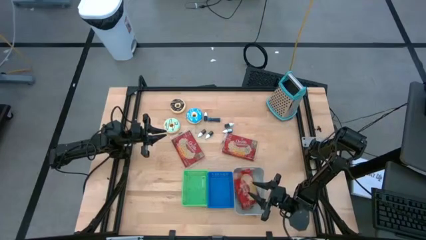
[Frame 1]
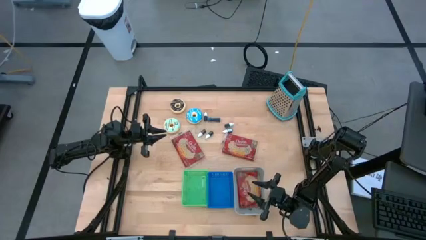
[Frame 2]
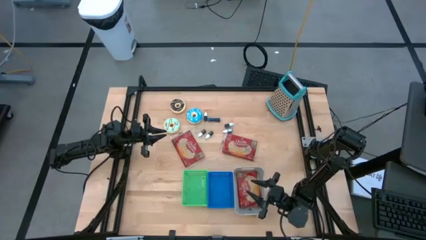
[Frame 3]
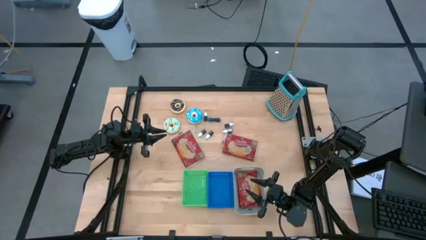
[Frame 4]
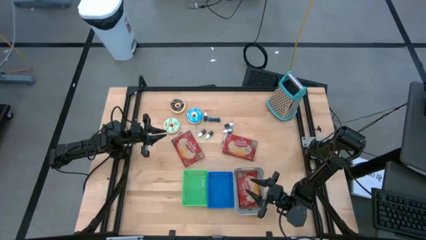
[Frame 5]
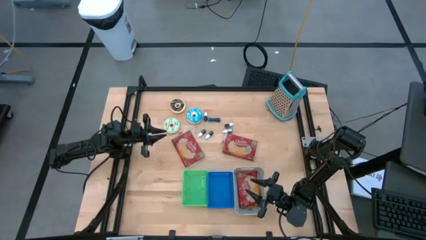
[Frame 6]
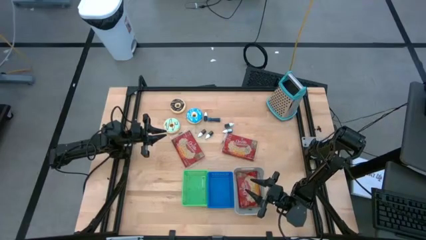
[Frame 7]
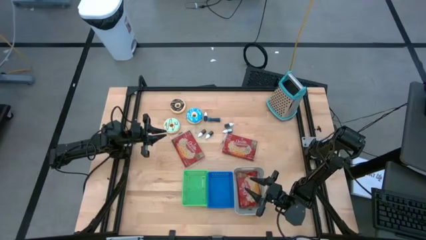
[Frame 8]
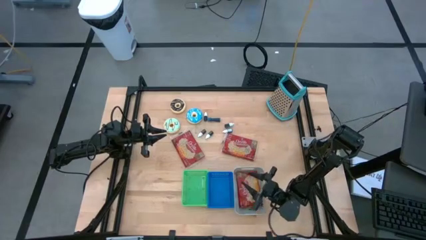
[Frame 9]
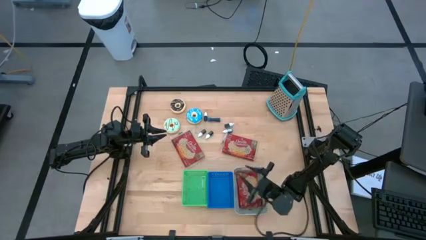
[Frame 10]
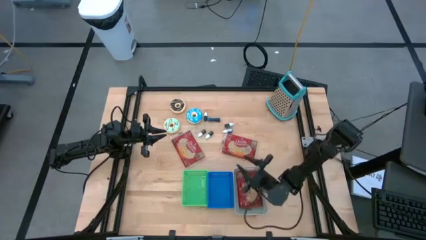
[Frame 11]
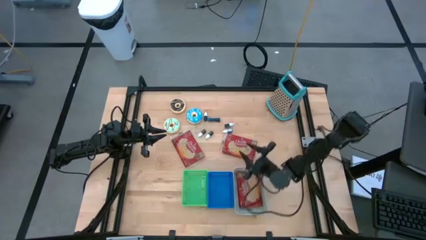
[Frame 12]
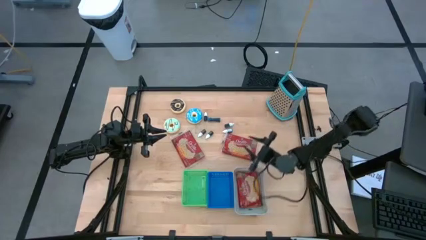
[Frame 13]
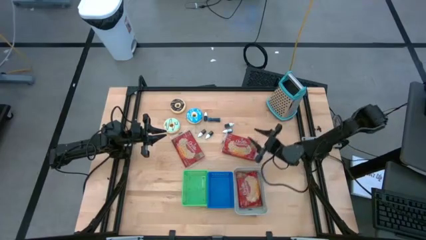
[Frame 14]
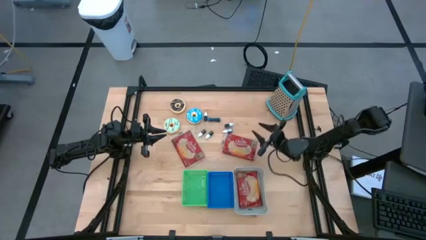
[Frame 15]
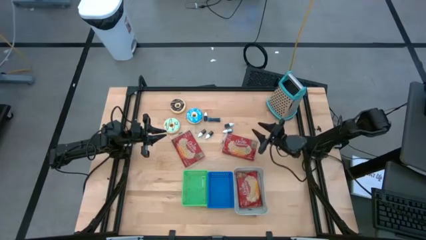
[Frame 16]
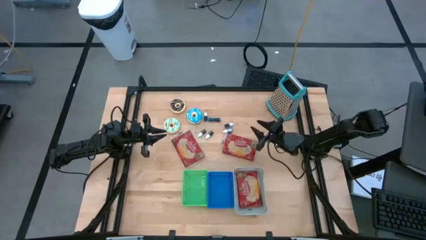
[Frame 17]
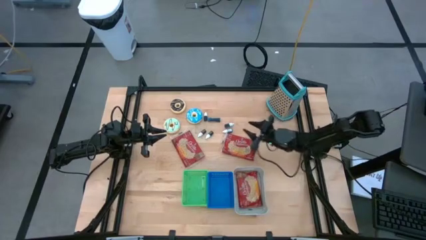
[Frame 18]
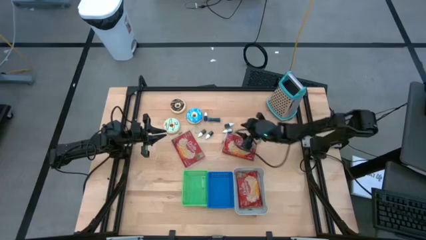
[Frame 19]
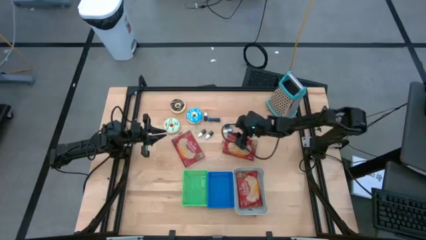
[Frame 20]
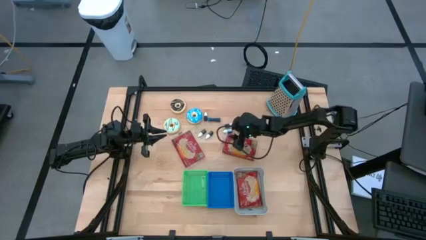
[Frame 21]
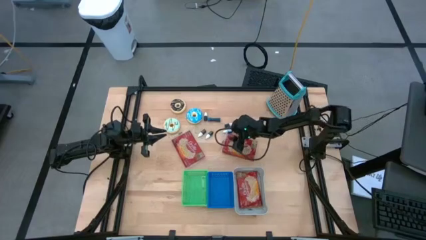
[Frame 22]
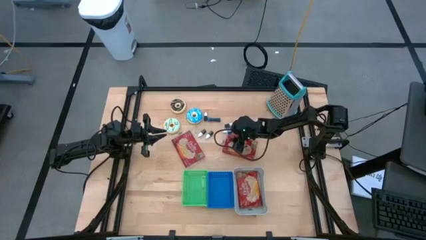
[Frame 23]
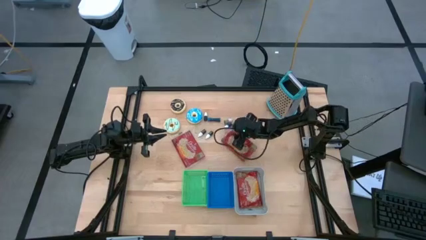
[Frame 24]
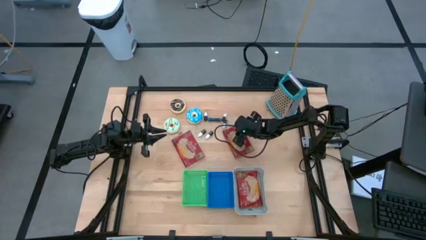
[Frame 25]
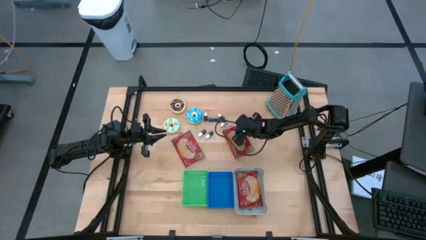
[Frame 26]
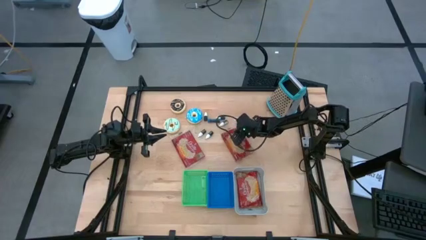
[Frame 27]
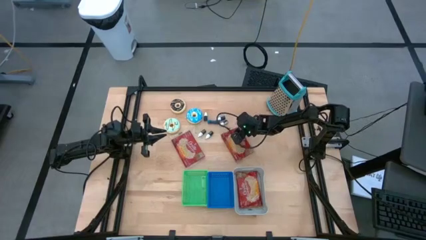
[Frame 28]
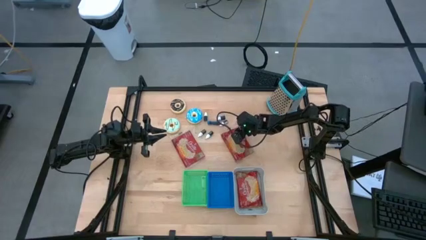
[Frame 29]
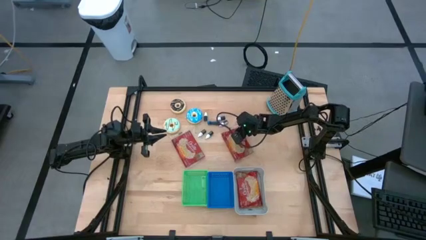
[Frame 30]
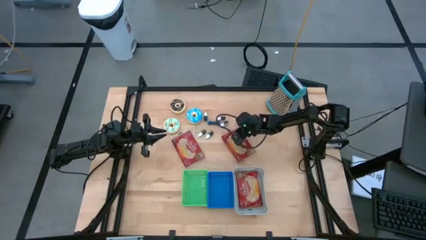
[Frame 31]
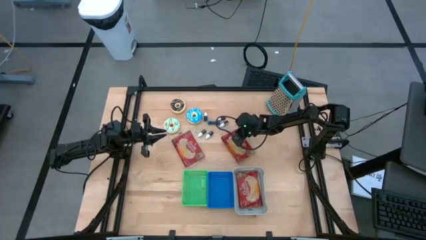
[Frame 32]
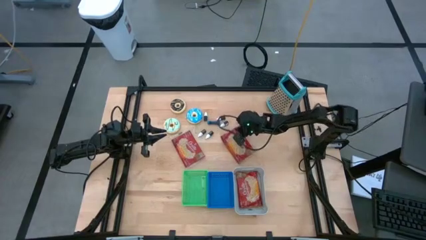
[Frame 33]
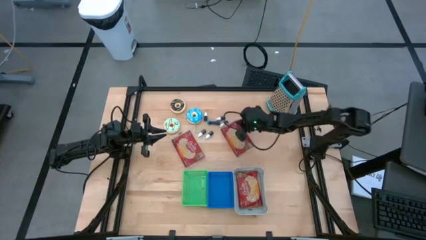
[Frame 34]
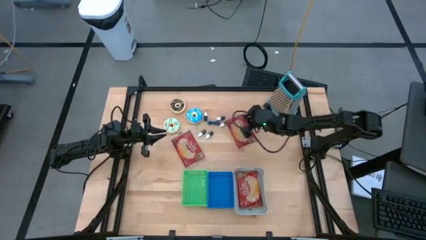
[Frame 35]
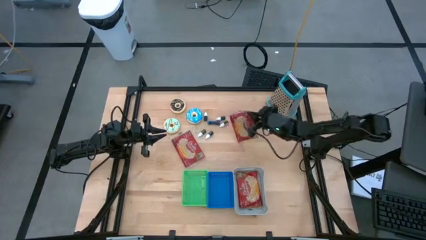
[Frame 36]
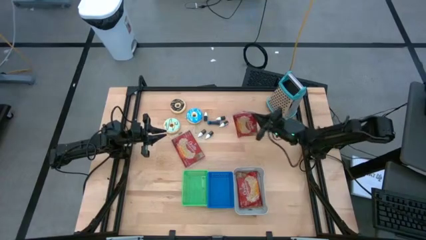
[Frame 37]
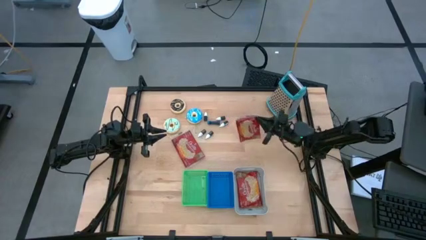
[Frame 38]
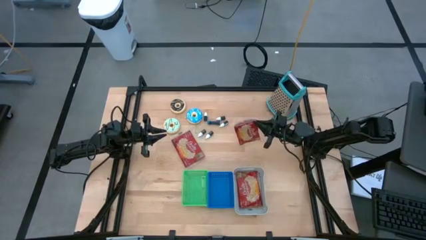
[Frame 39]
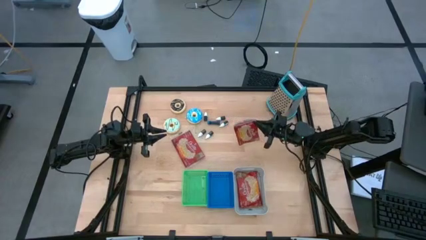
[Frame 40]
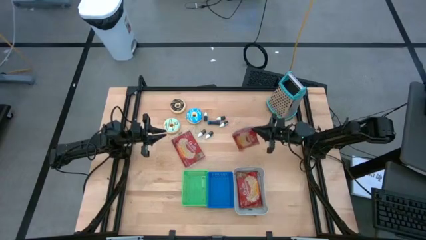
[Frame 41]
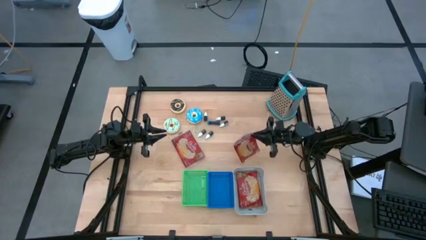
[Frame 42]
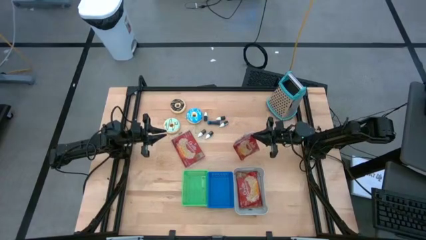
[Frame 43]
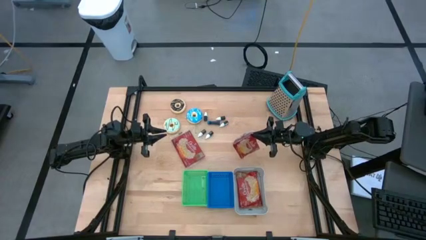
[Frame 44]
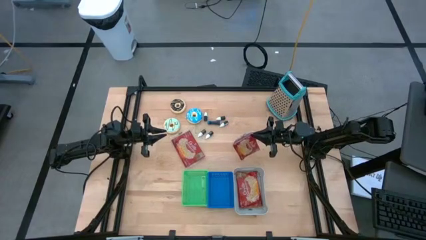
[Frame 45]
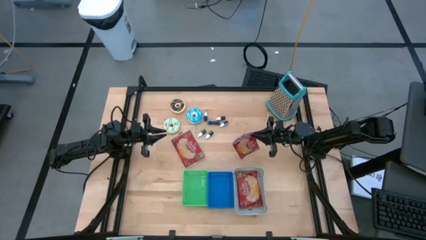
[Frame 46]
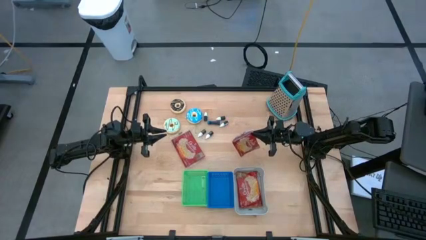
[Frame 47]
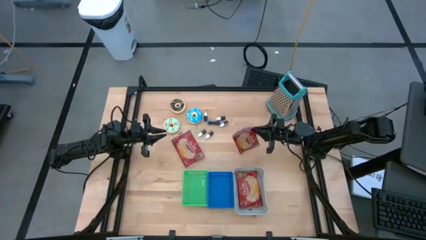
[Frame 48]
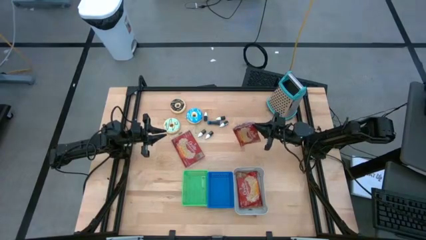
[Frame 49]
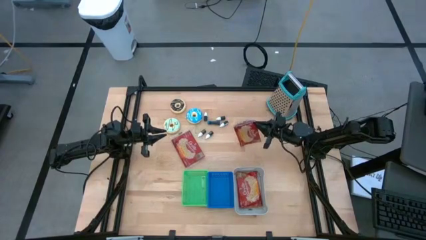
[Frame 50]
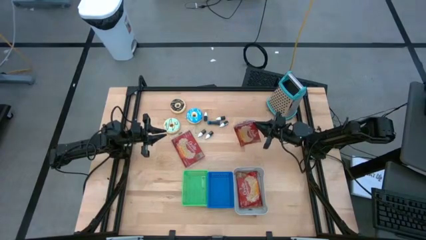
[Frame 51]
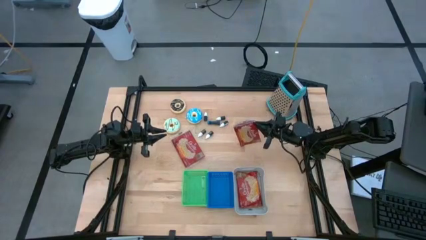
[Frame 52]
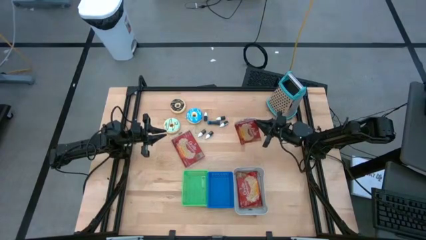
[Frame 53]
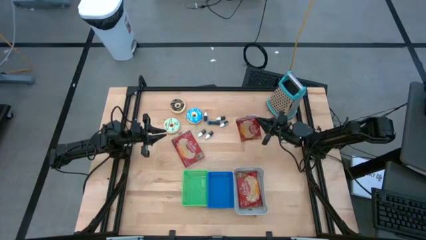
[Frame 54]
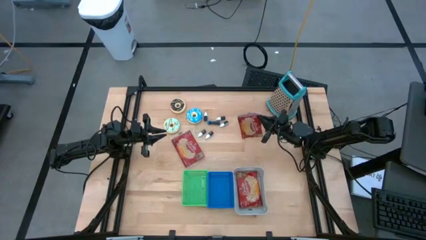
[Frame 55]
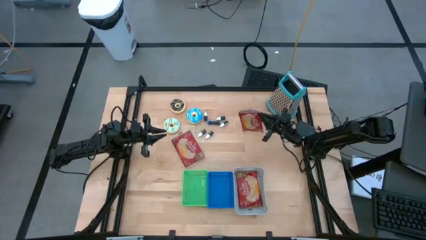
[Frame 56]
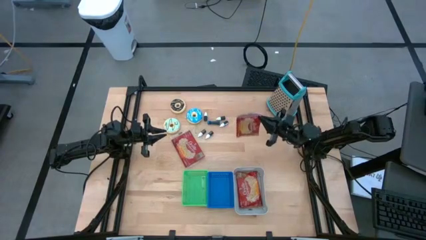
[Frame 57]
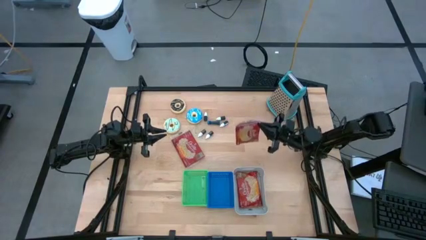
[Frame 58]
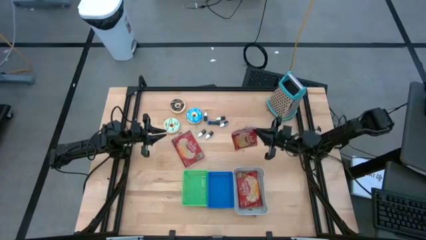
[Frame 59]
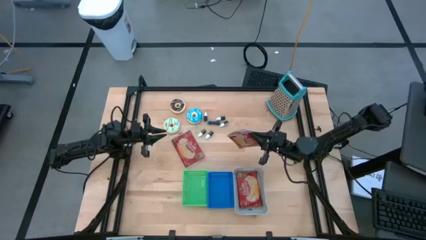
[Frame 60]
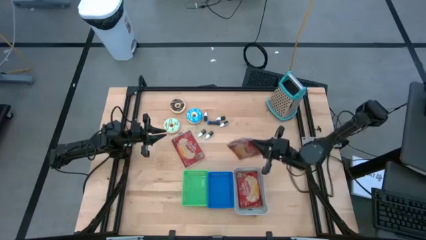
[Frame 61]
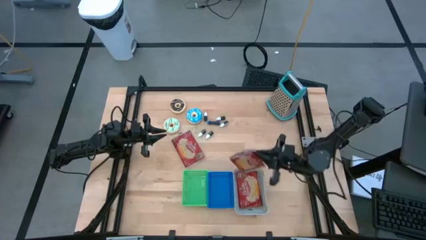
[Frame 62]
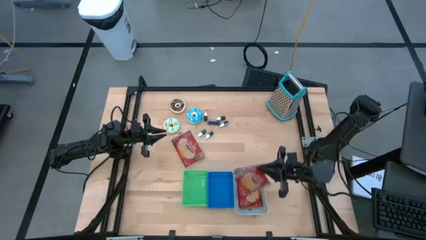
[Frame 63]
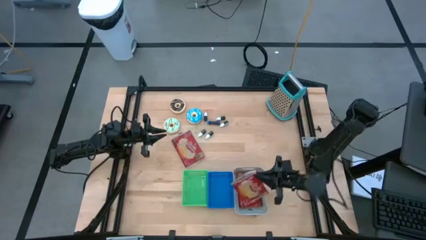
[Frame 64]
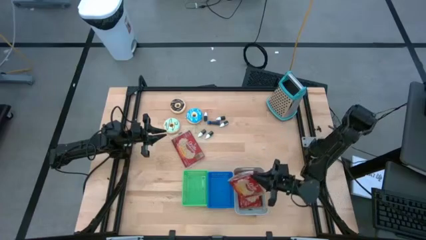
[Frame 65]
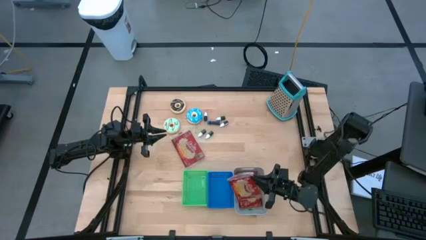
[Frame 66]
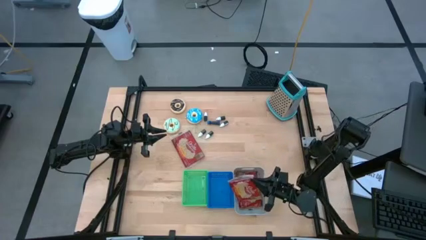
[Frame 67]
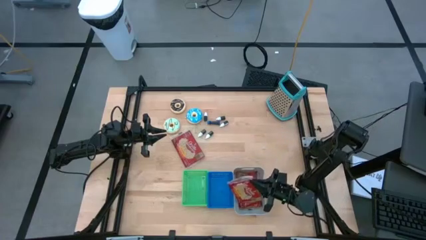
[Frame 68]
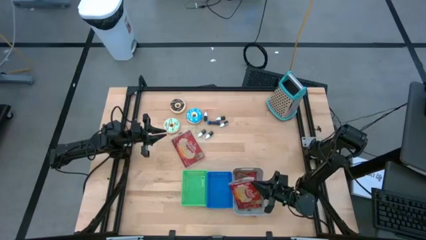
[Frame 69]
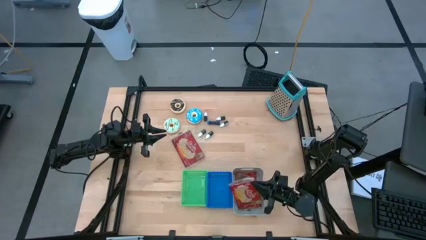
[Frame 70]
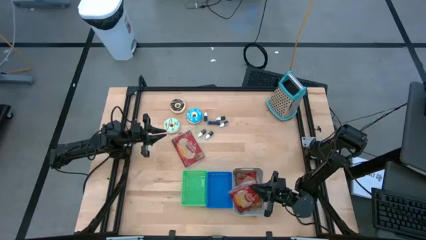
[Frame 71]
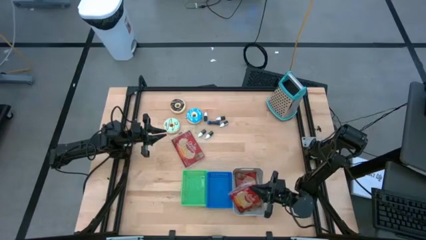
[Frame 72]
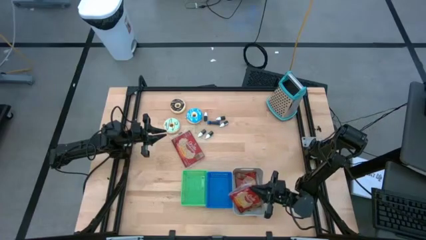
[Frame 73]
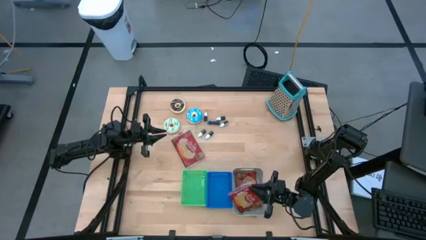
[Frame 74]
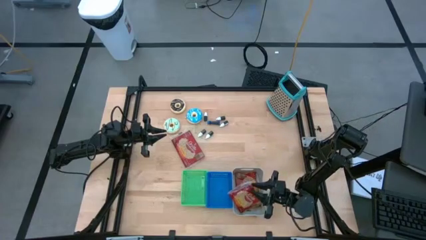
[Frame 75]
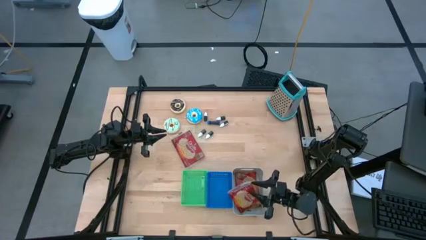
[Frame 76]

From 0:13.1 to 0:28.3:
Put the right red popcorn bag into the white bin
